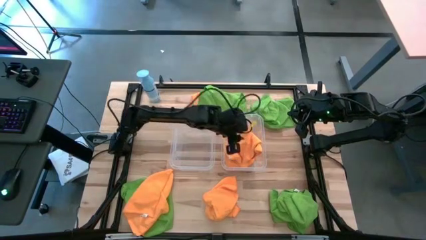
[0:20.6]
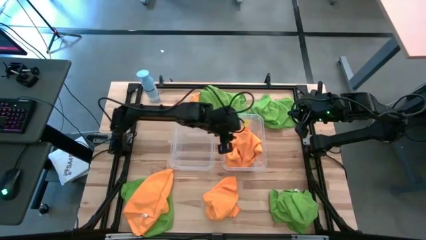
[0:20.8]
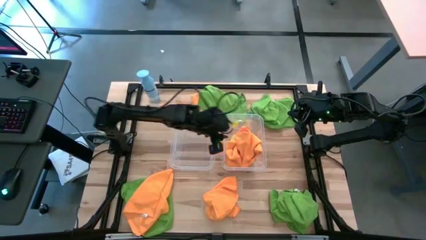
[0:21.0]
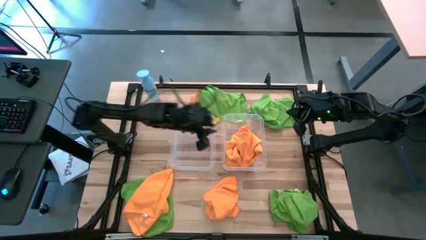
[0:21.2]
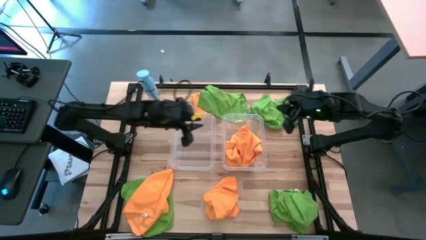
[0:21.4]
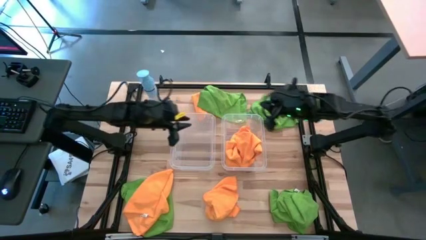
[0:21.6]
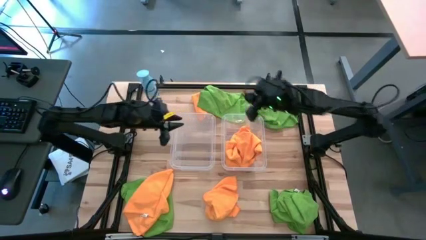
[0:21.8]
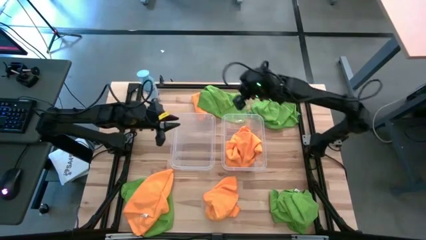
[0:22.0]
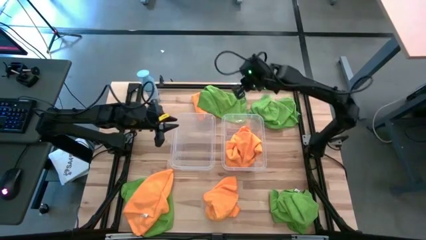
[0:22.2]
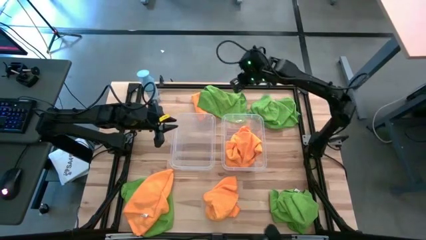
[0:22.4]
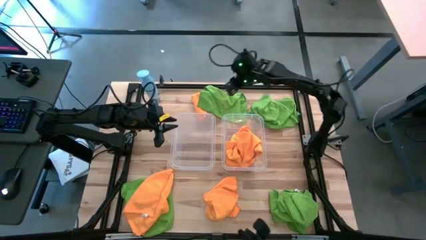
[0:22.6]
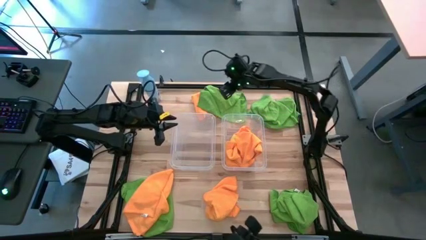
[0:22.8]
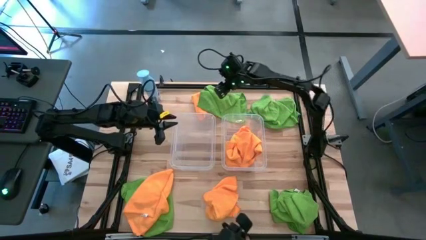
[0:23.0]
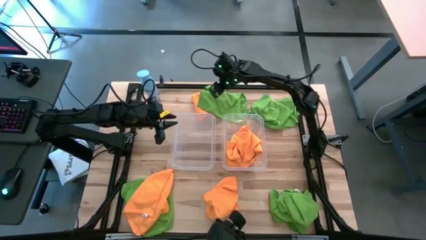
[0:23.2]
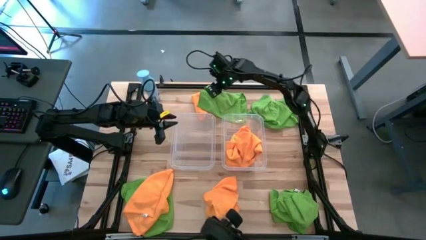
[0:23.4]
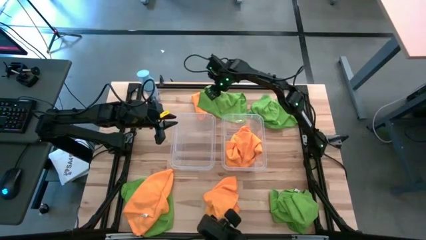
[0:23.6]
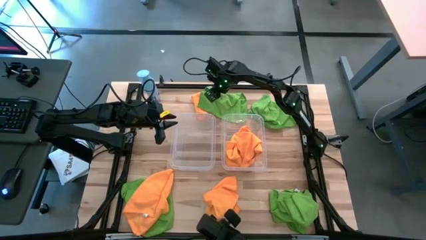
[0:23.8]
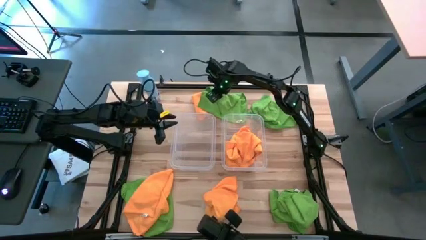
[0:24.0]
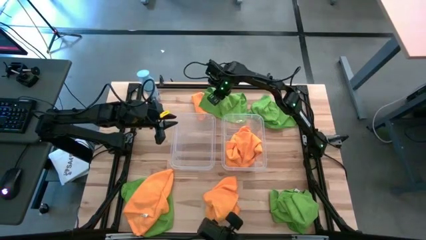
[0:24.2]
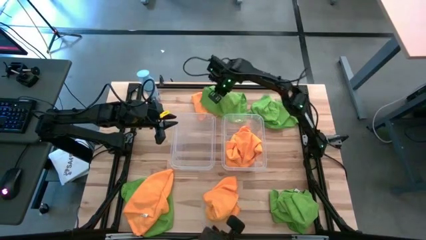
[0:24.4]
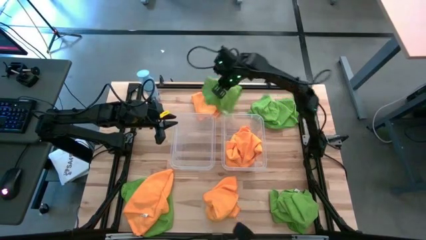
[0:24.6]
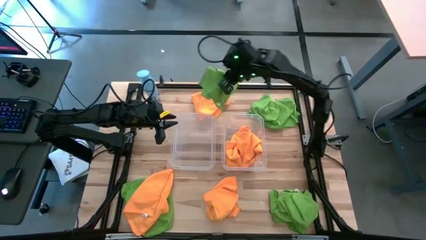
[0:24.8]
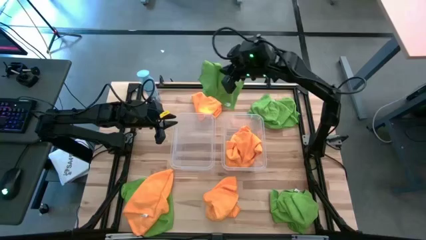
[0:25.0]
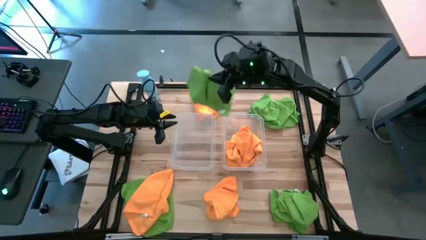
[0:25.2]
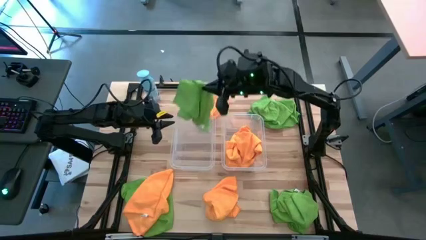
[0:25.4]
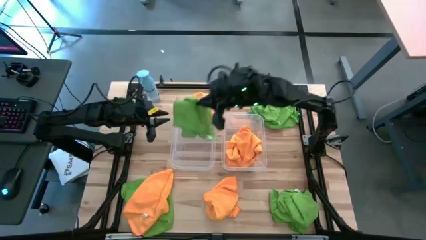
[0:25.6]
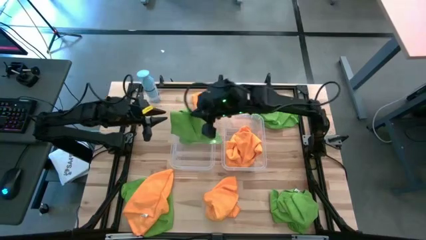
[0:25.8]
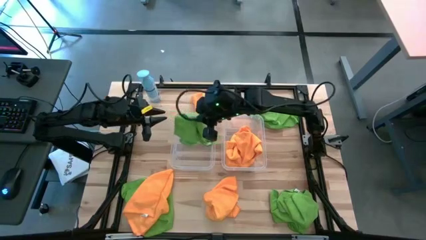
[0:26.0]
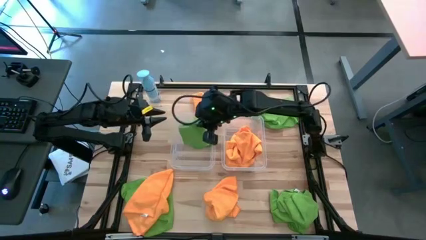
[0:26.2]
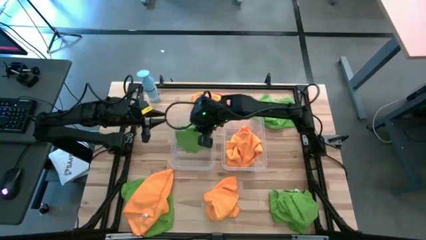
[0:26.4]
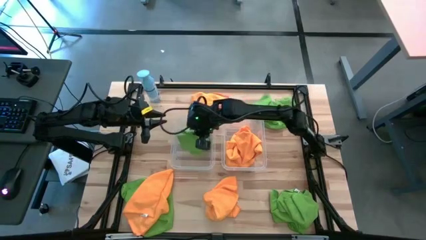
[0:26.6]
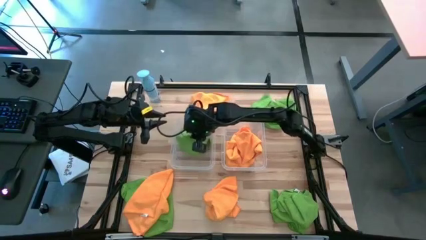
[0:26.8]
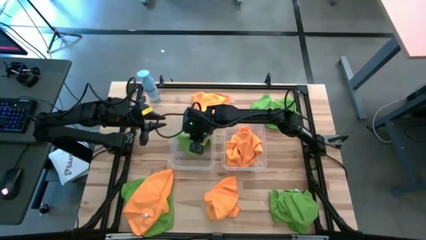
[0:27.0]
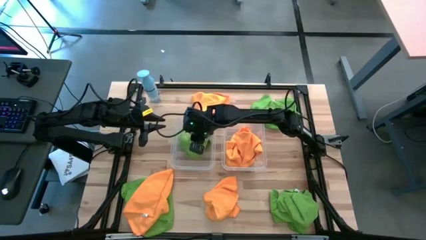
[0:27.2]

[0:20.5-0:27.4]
Task: Sort microfiber towel by color & place in baskets
Put the green towel into the left transparent bin

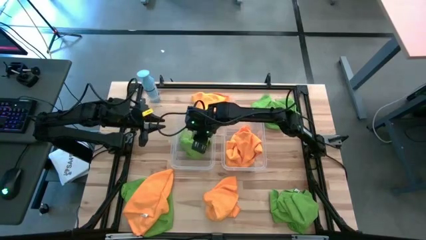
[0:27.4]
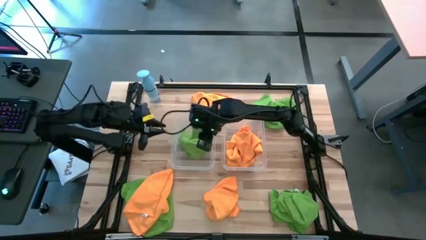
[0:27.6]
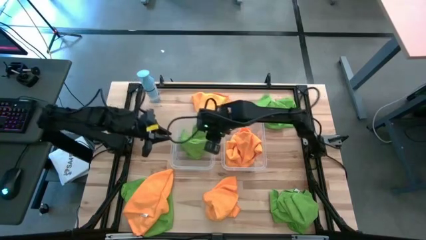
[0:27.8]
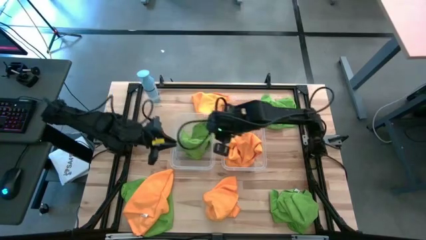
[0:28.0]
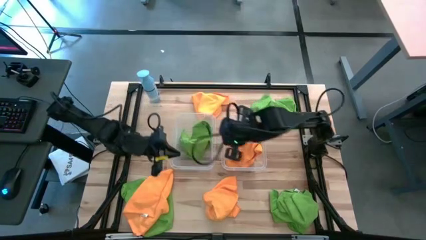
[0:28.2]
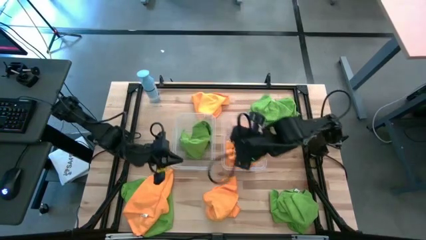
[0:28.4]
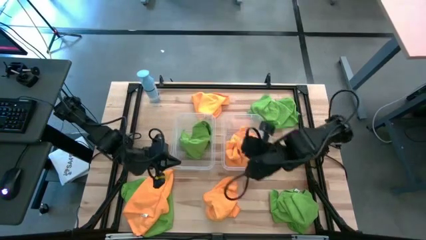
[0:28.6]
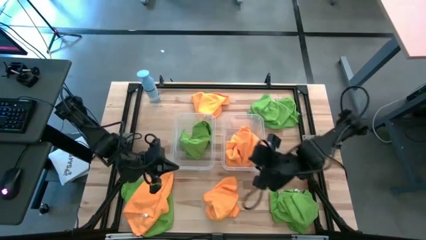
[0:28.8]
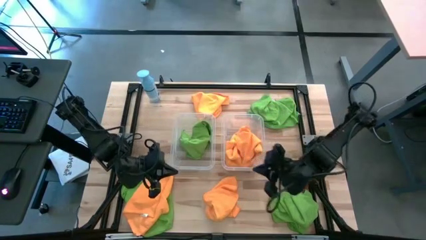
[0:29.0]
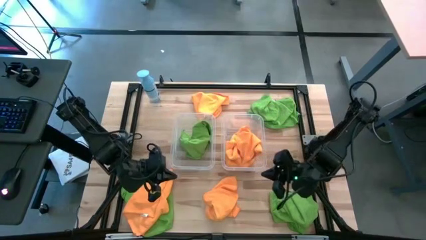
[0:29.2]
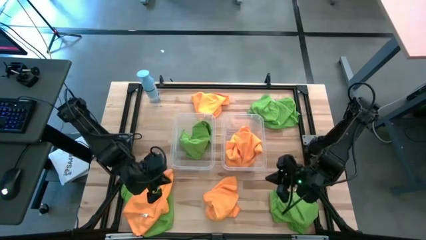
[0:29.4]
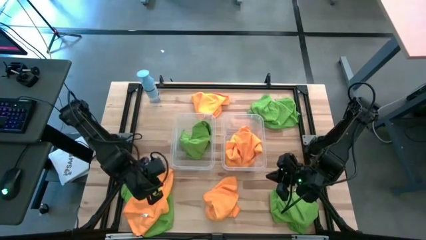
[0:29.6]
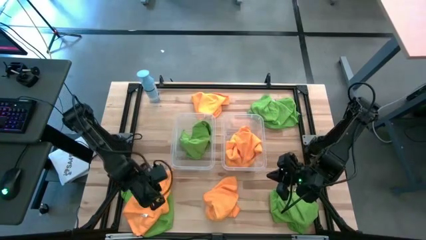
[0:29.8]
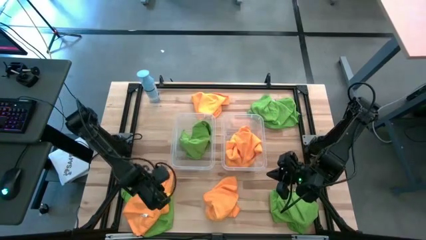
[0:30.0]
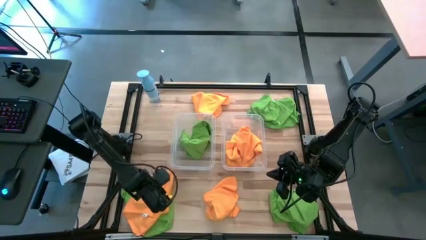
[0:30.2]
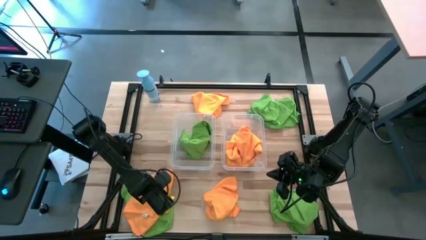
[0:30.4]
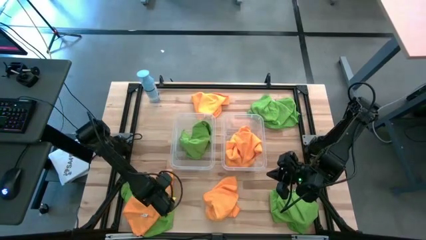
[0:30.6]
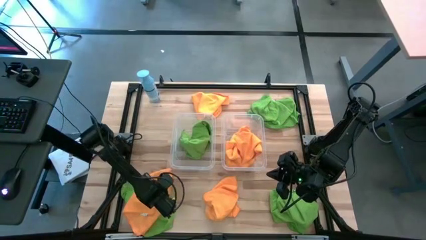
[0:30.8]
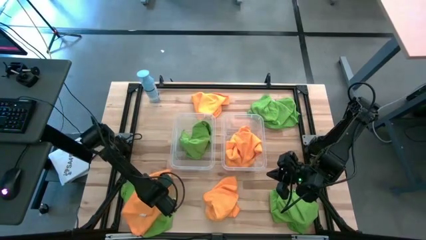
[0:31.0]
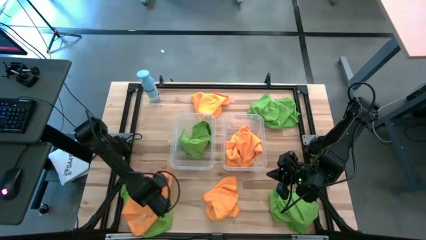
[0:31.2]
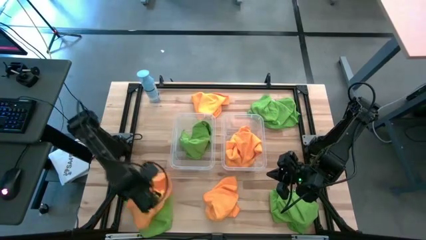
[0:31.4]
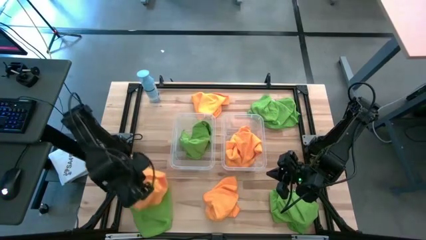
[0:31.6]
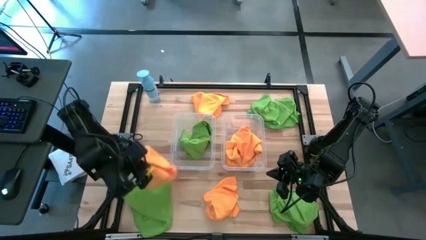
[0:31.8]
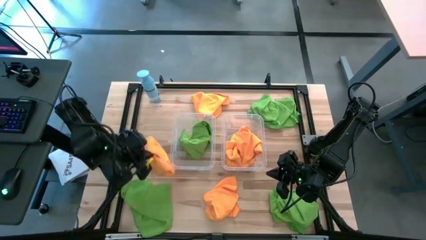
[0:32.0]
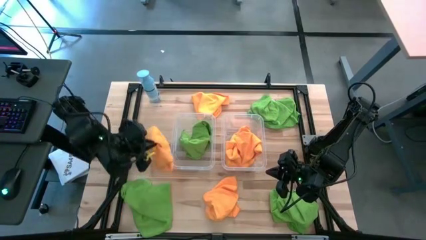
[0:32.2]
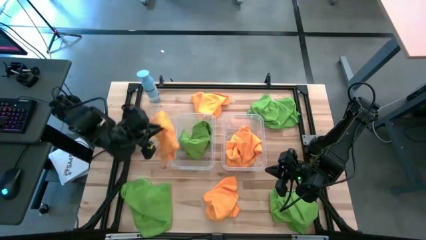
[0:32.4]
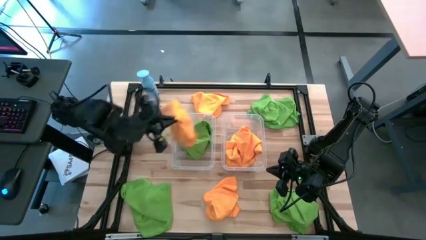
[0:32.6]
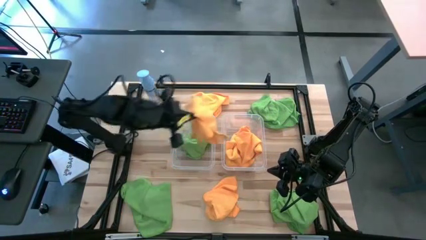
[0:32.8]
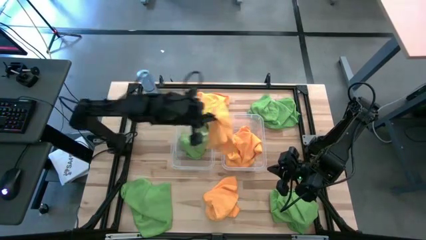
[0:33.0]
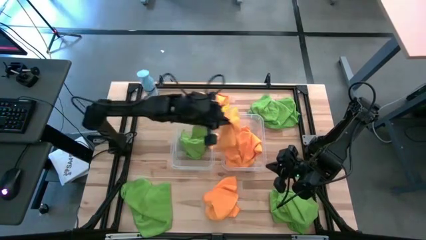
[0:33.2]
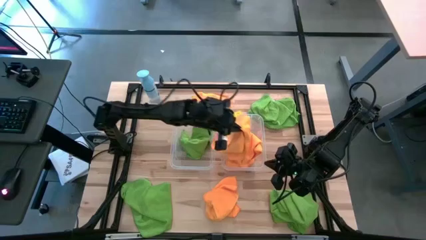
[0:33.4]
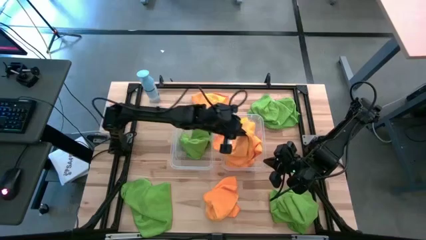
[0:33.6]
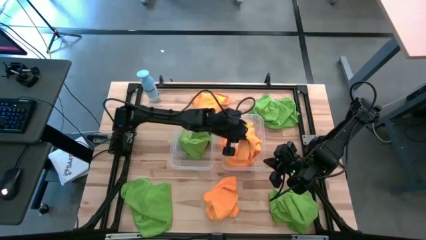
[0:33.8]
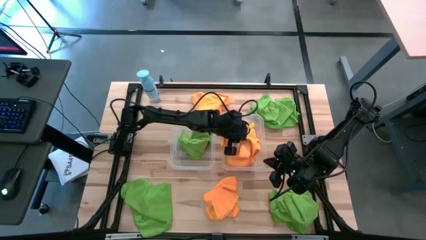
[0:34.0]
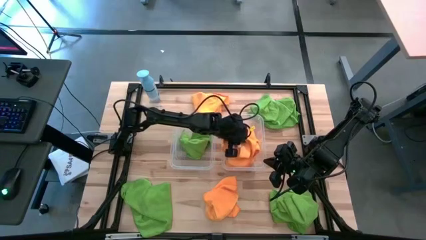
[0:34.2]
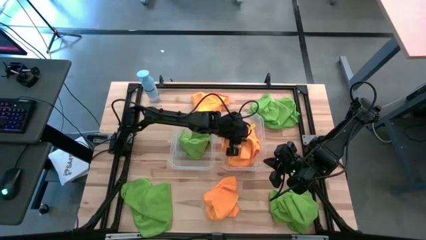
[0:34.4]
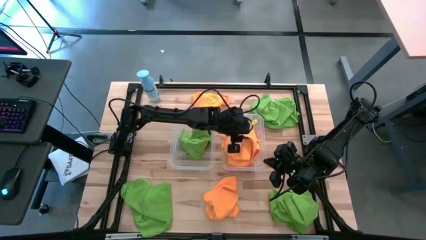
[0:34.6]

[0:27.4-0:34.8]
Put the orange towel into the right transparent bin

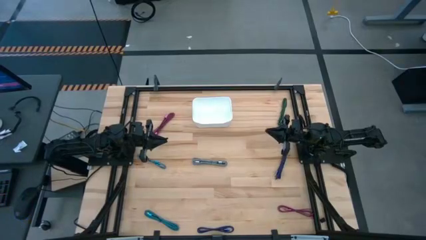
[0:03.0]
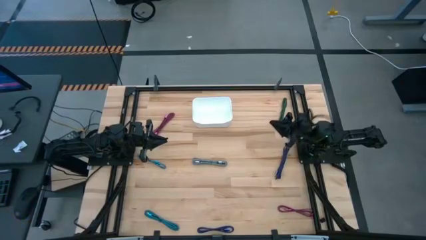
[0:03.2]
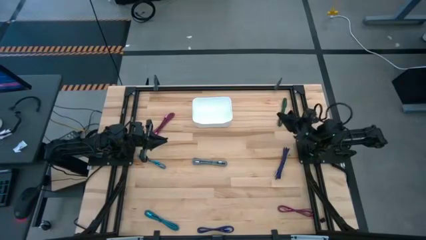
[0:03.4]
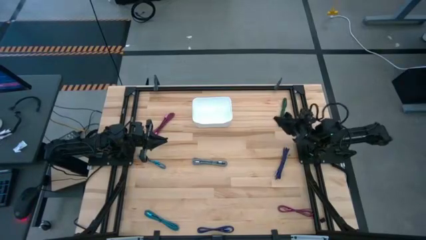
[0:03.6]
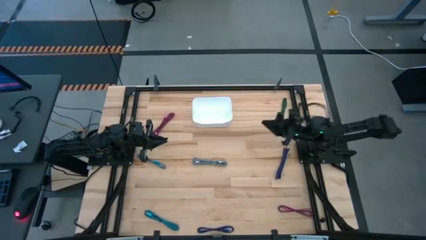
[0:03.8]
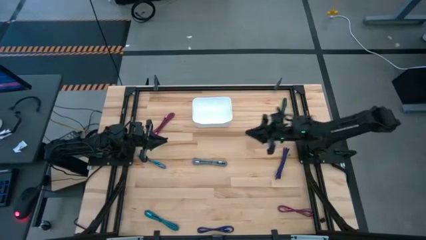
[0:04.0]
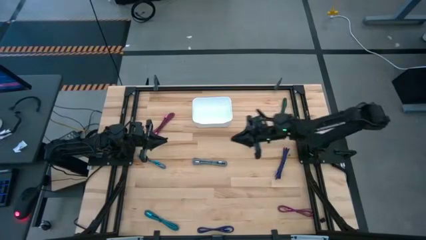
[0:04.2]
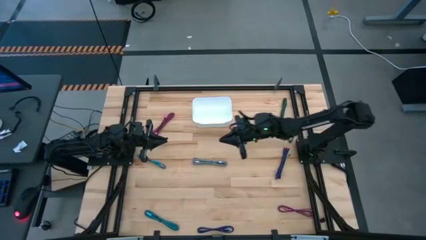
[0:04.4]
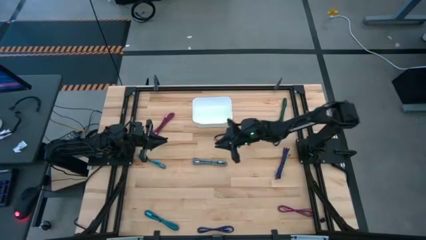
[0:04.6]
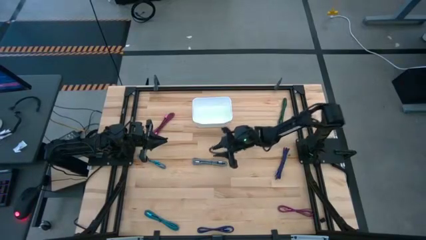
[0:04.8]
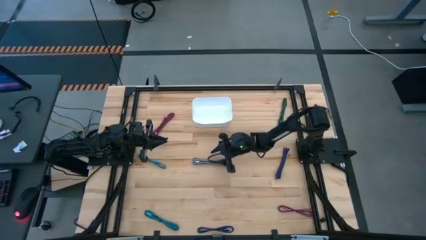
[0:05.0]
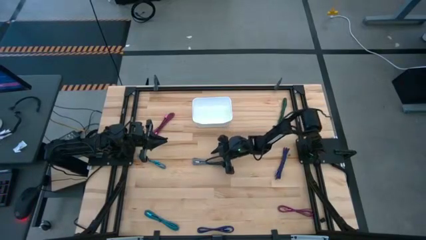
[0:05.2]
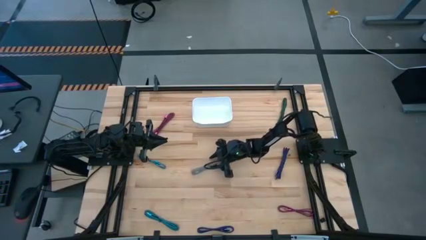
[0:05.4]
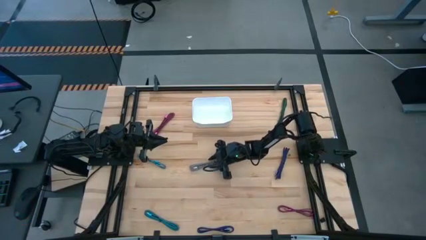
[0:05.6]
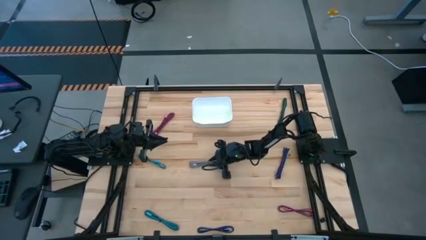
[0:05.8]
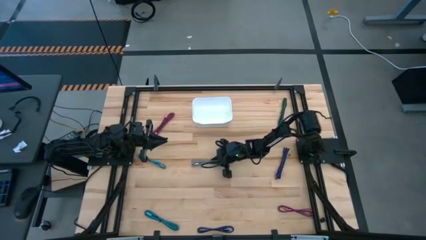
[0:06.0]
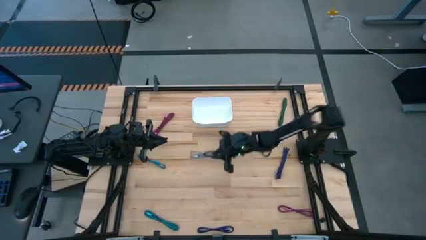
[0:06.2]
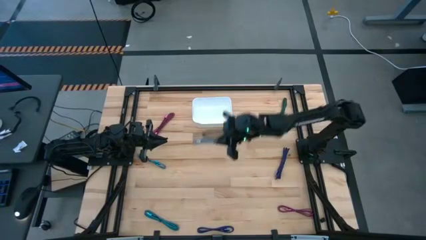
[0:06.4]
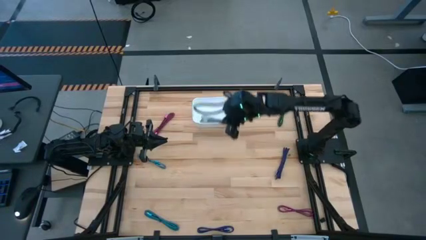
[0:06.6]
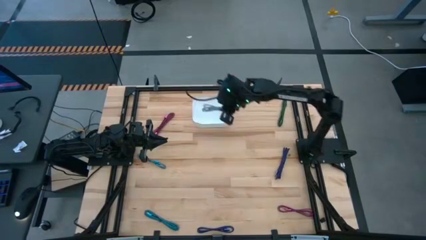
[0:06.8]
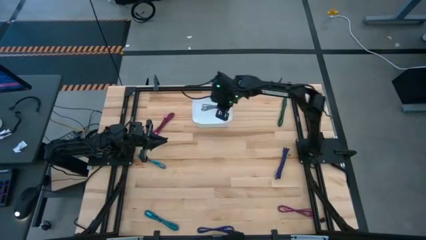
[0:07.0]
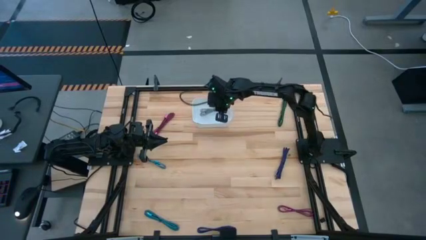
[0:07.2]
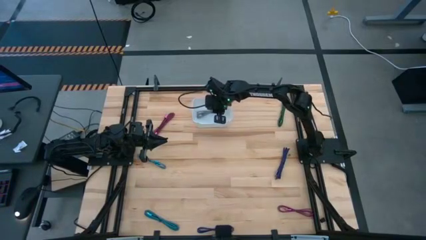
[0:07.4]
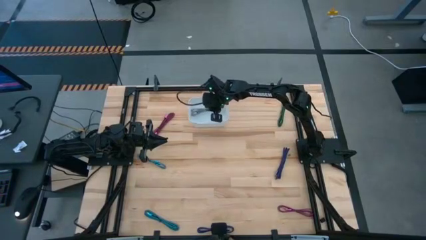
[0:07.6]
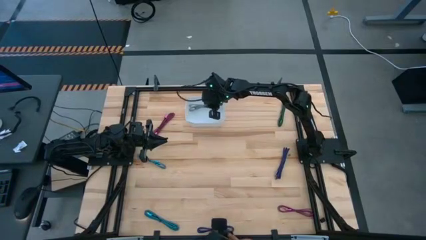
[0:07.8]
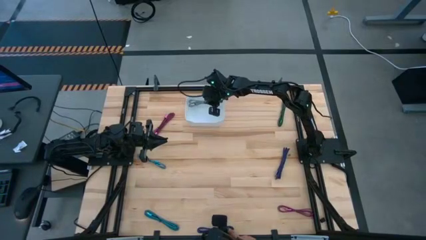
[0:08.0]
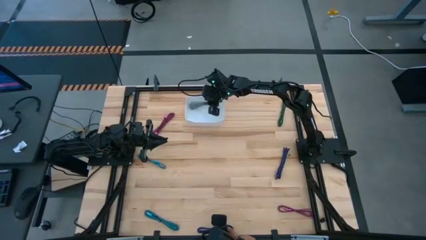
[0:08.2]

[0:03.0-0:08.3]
Task: Pick and place USB-C Cables
Put the black white charger cable into the white bin
